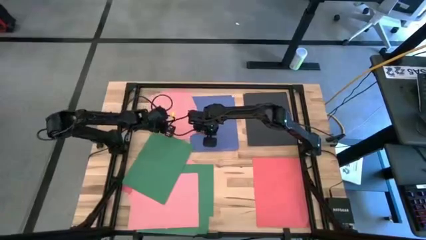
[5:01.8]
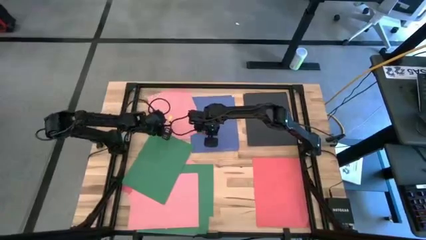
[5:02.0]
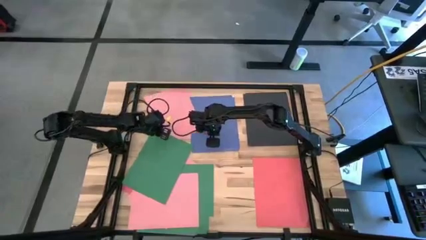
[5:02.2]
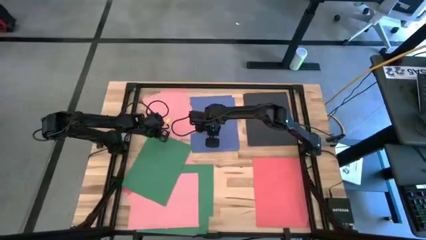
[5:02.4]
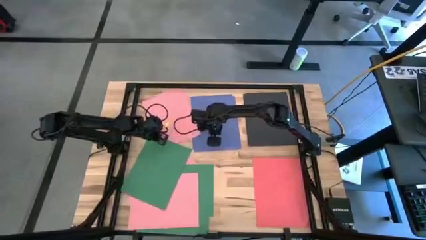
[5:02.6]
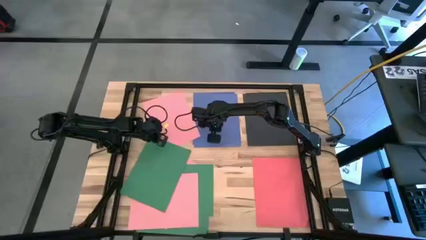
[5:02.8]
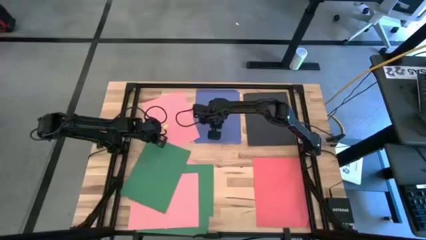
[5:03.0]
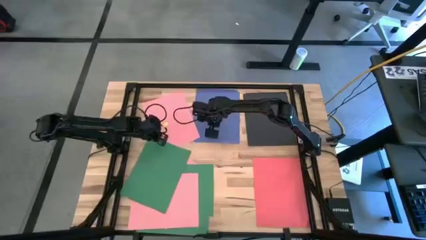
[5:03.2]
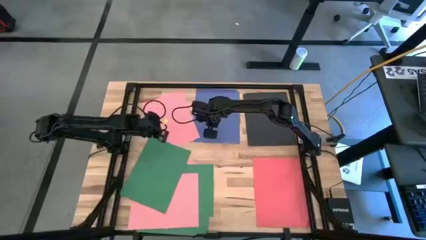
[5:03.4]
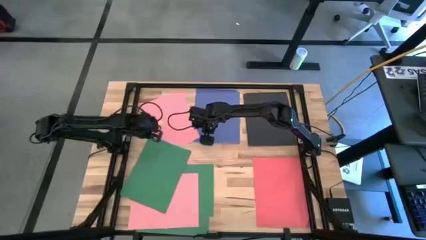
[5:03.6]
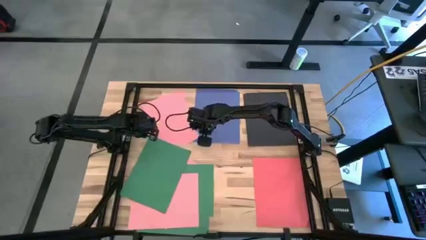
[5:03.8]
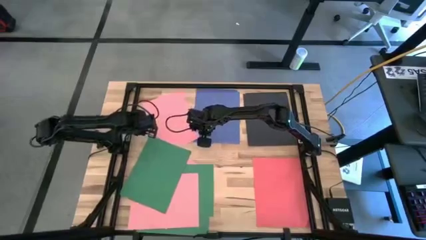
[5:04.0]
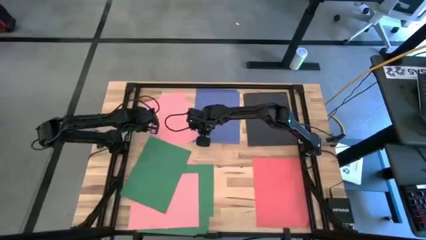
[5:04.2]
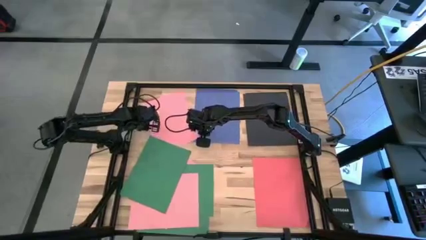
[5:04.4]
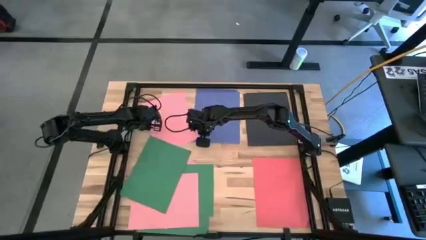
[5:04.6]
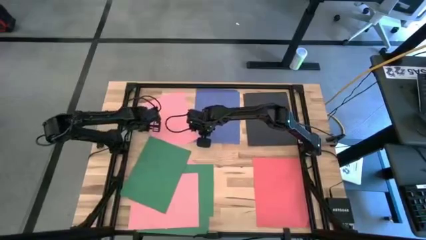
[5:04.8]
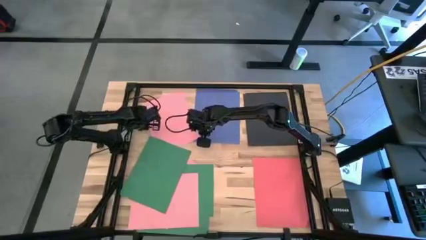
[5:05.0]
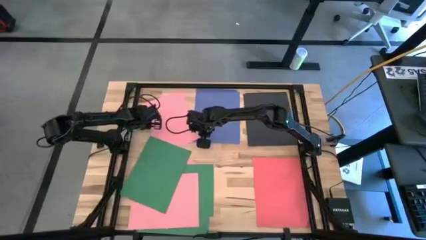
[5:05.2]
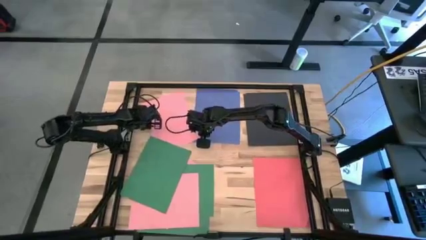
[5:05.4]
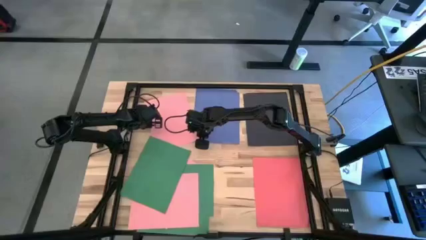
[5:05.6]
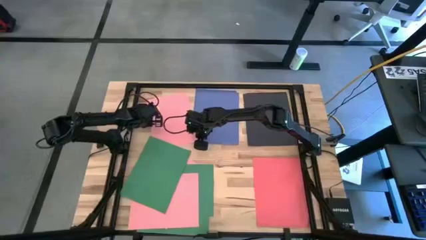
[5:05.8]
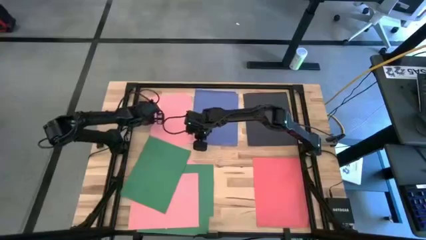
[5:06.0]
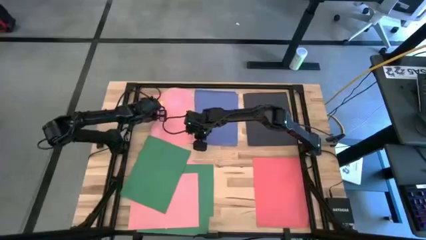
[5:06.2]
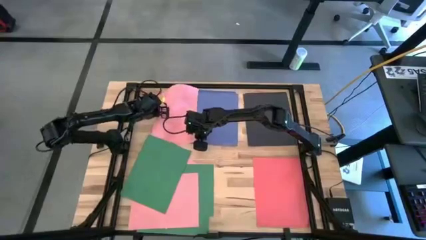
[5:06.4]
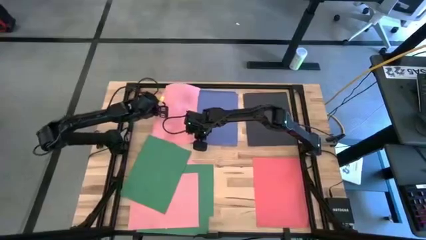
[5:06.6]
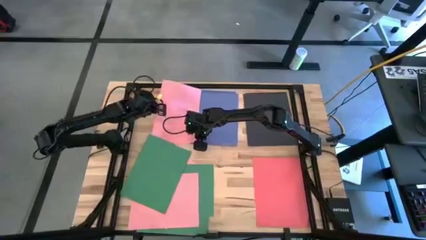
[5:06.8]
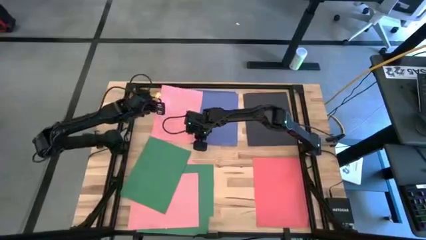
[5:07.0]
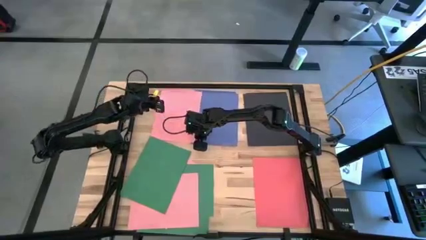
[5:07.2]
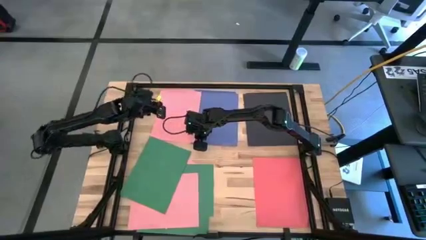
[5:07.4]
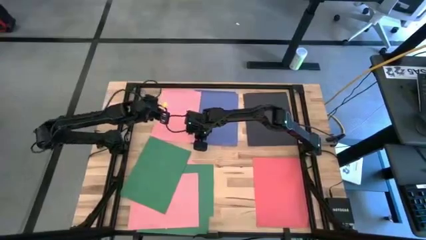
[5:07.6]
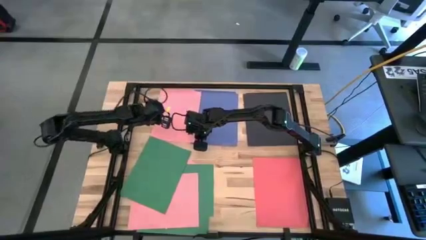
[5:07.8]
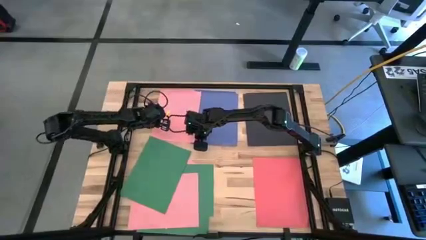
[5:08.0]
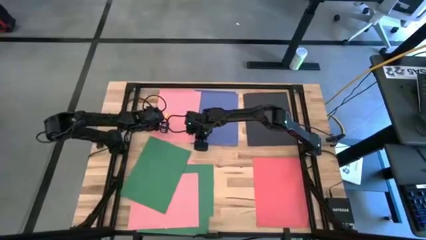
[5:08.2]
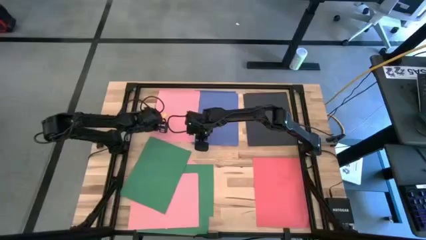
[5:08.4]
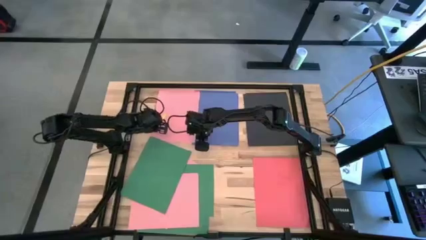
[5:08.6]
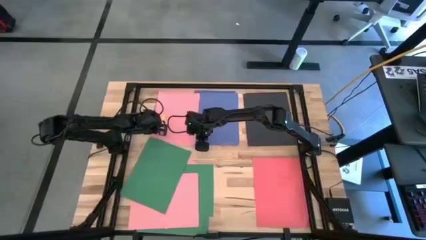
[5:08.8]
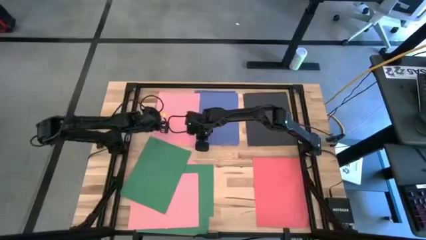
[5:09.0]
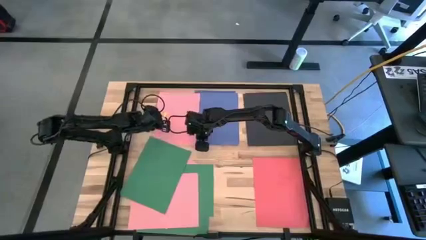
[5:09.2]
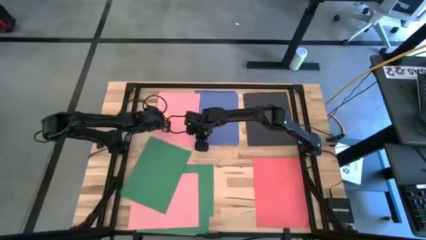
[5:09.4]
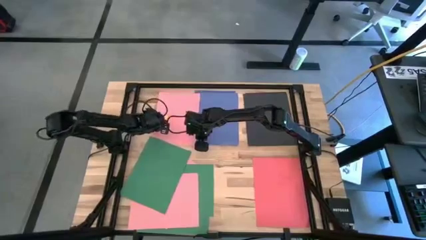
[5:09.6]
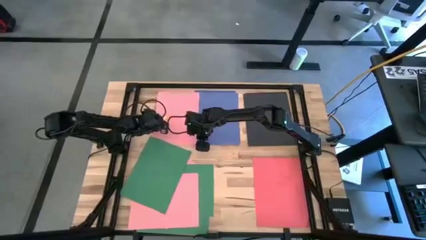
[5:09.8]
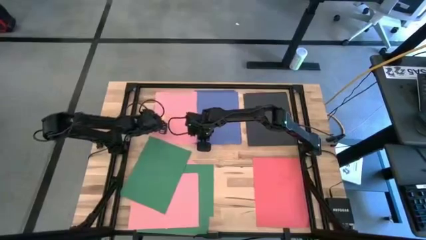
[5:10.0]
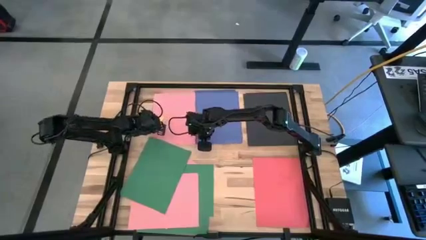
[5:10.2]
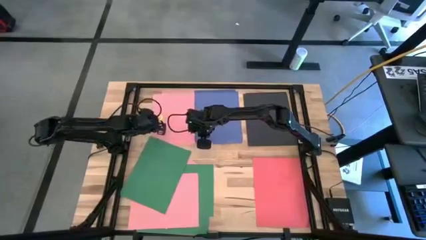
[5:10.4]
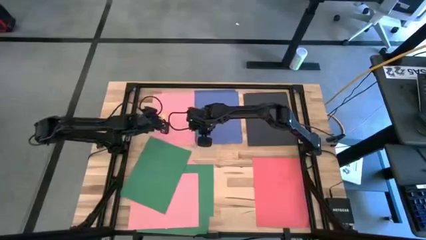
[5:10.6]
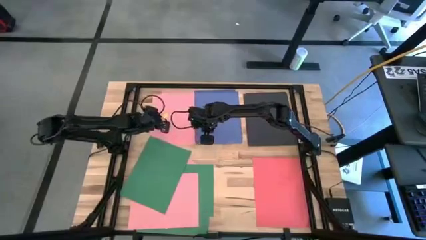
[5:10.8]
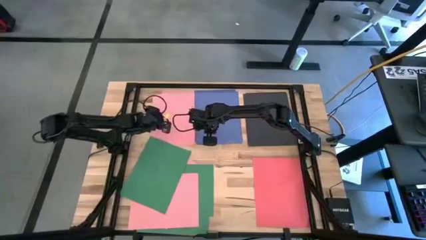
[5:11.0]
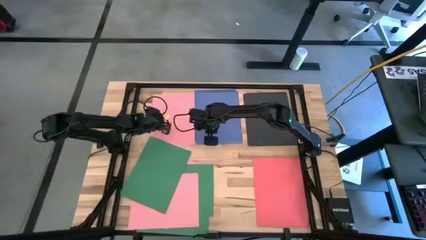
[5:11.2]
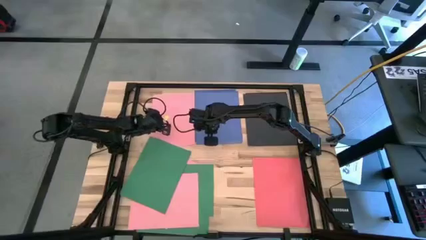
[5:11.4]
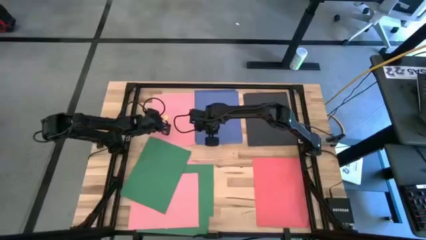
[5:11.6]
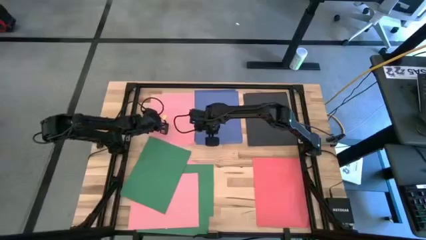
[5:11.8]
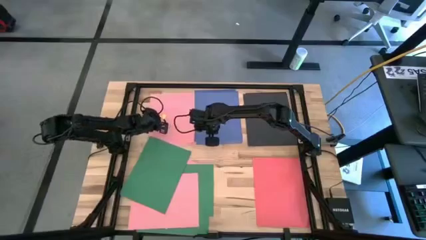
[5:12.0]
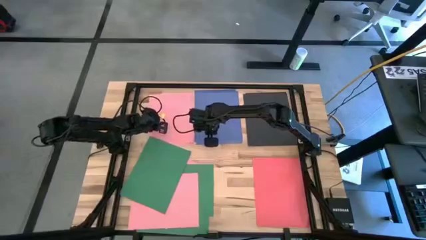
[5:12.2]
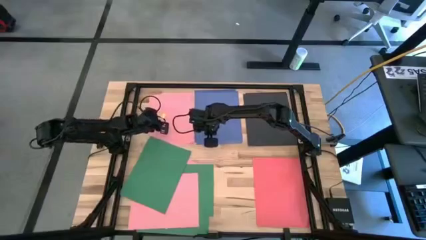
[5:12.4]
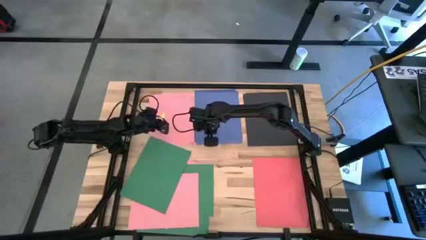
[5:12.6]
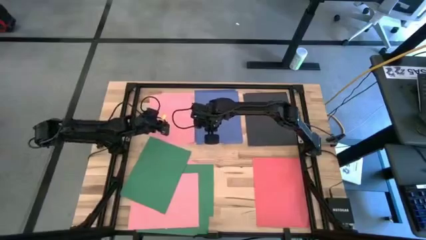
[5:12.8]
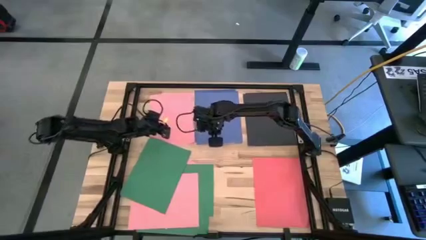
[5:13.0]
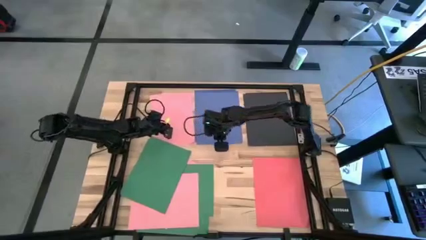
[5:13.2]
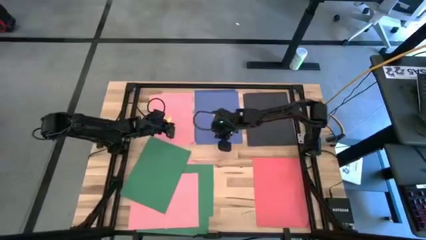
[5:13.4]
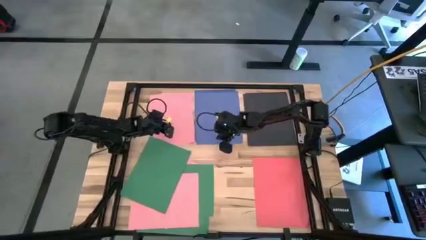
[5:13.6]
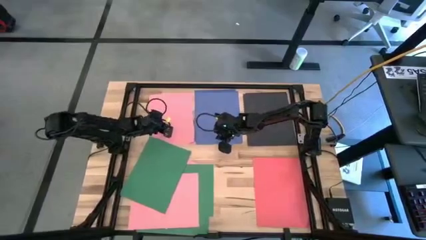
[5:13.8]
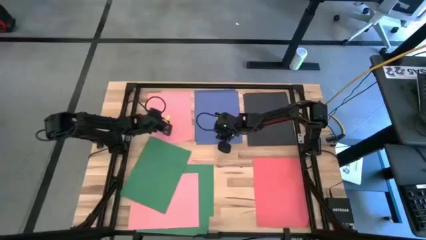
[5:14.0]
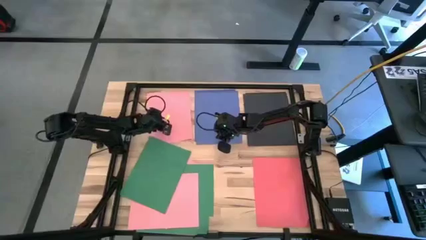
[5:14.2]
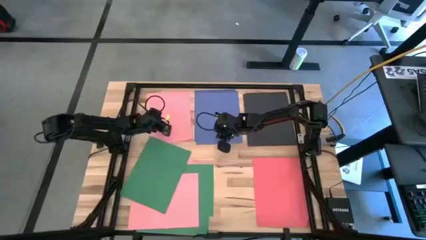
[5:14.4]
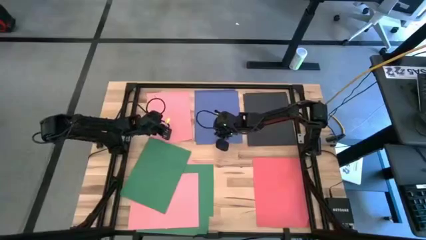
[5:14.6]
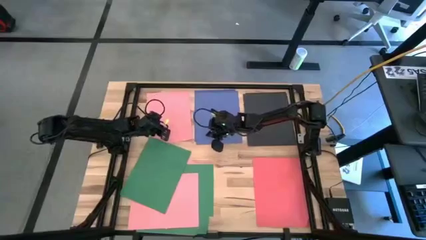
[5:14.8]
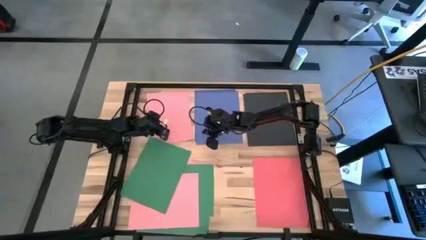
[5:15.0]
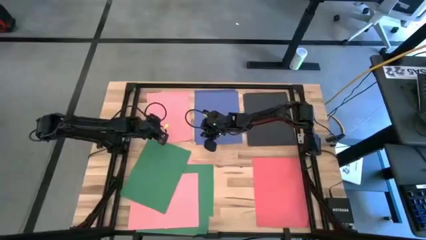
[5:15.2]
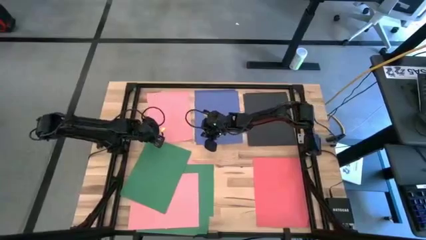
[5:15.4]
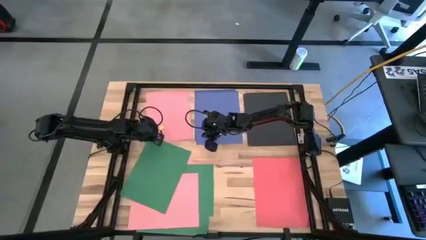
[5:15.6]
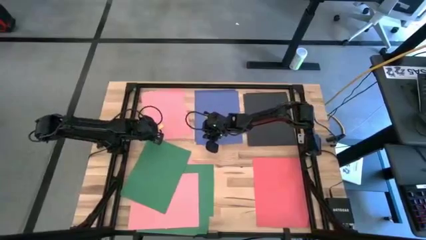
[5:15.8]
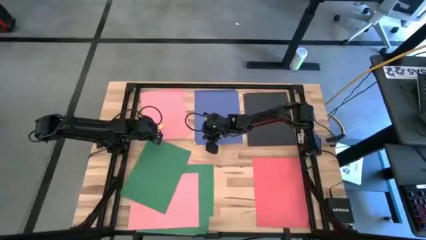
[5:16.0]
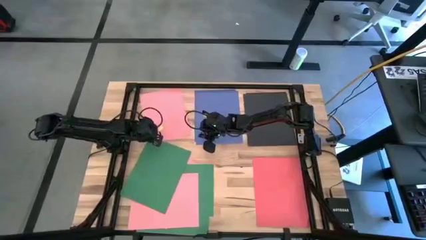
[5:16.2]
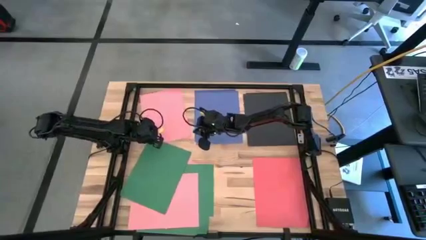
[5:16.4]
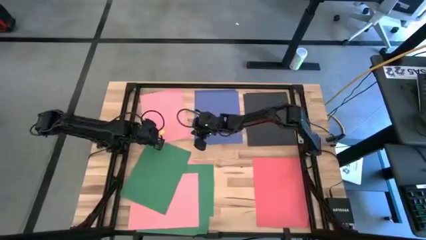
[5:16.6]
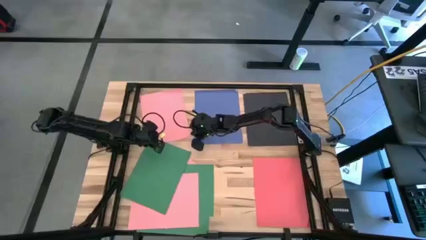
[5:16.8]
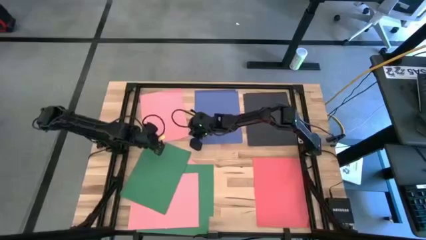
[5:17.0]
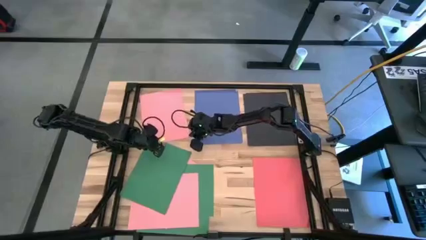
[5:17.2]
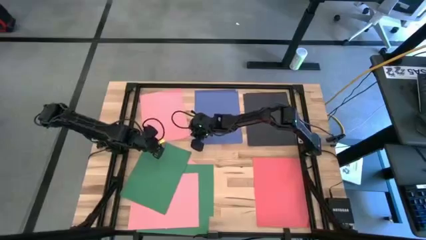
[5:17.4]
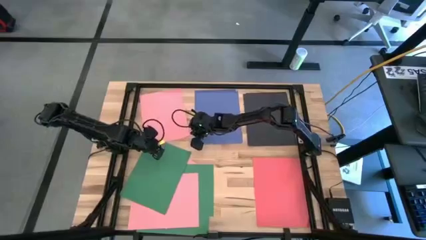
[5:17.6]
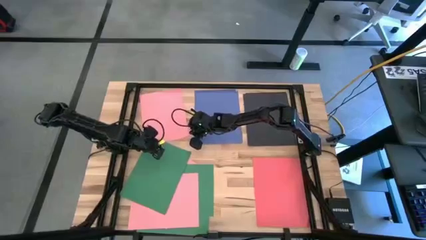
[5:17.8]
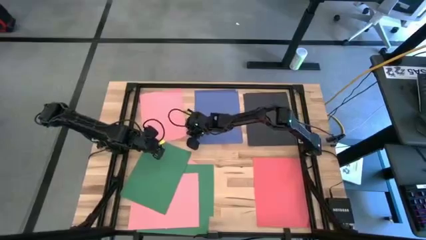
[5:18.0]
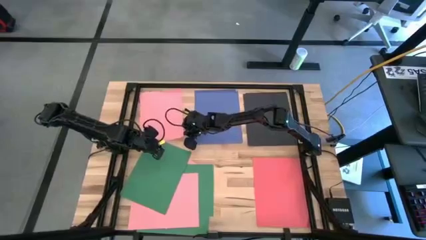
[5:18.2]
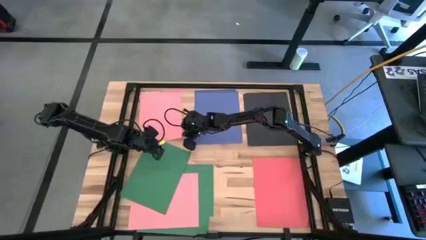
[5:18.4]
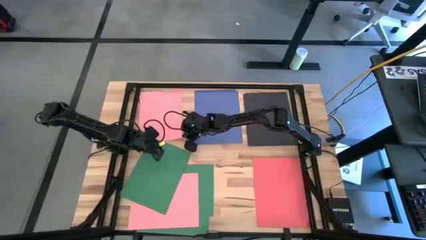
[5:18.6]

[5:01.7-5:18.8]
Task: Organize paper
Move the pink paper to the top left of the table
